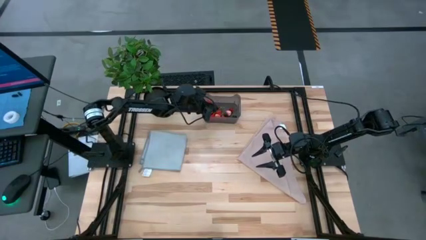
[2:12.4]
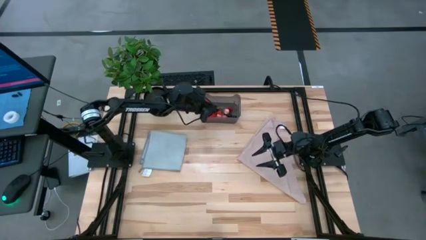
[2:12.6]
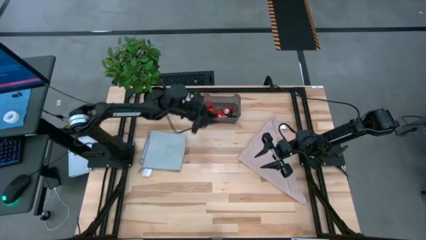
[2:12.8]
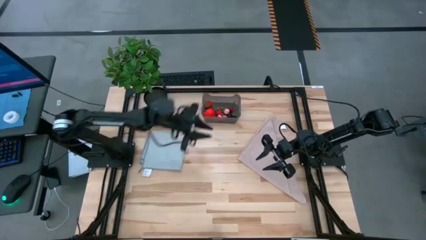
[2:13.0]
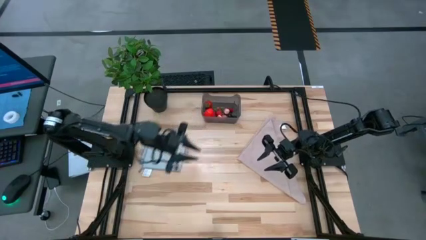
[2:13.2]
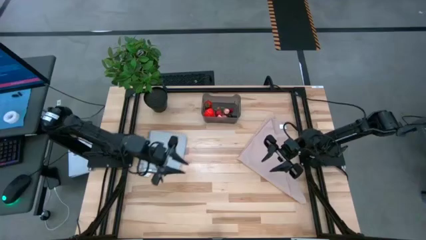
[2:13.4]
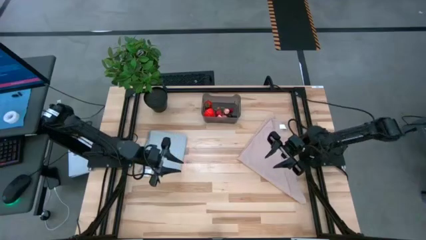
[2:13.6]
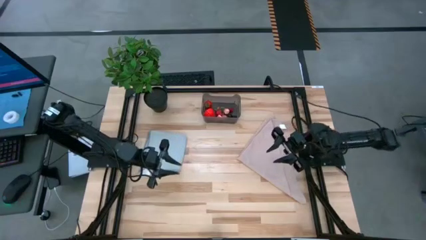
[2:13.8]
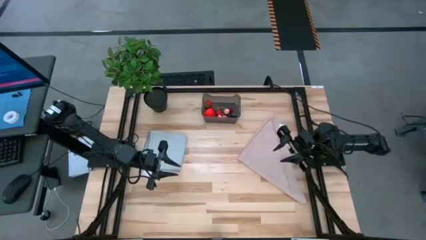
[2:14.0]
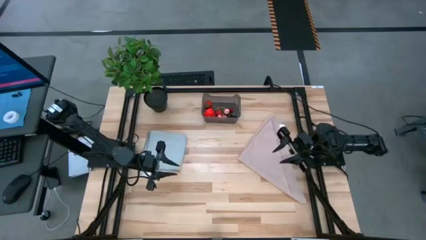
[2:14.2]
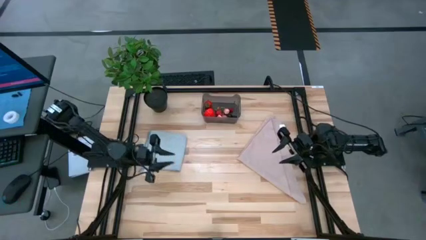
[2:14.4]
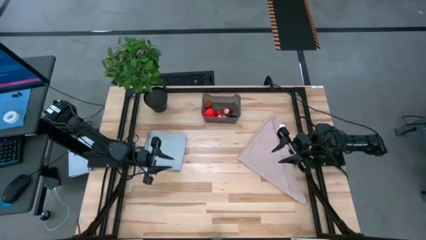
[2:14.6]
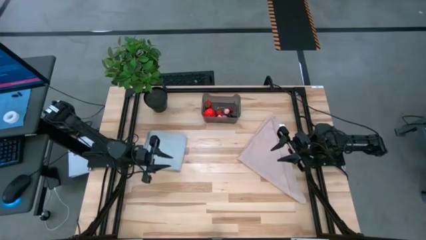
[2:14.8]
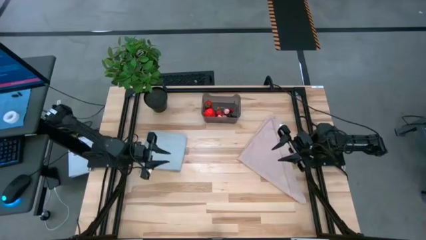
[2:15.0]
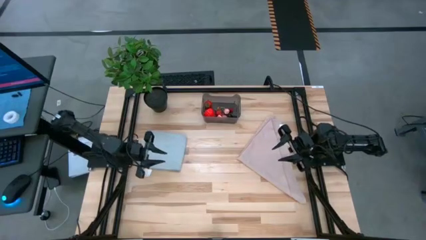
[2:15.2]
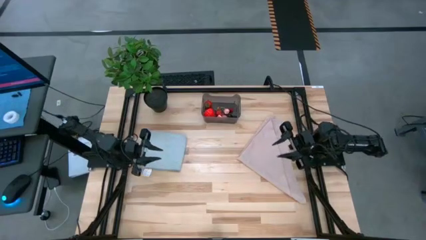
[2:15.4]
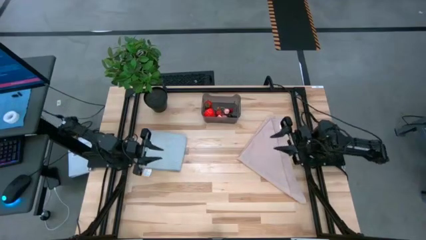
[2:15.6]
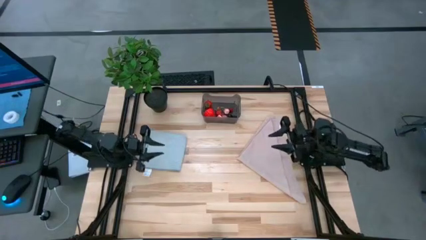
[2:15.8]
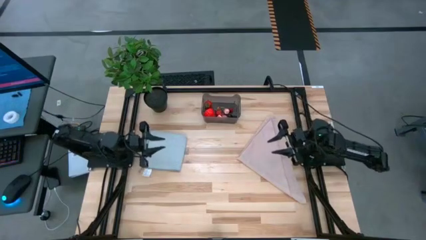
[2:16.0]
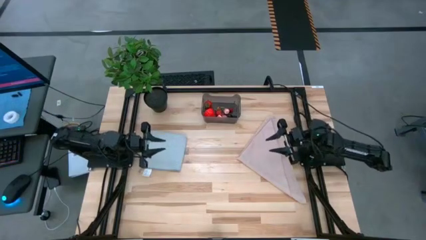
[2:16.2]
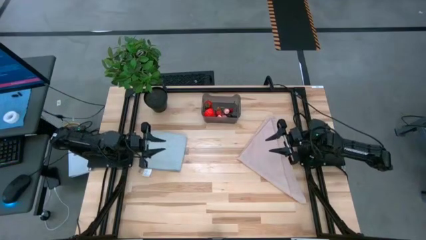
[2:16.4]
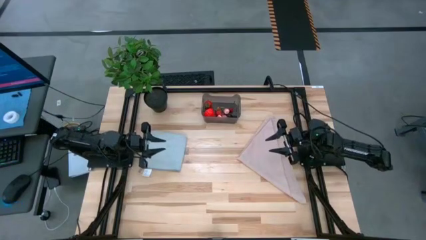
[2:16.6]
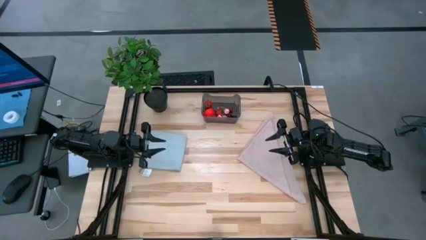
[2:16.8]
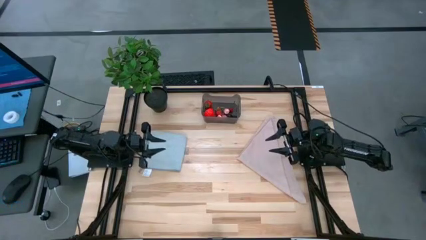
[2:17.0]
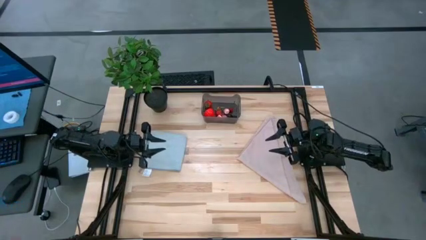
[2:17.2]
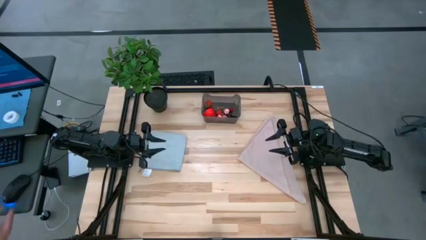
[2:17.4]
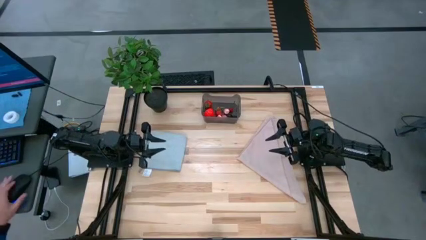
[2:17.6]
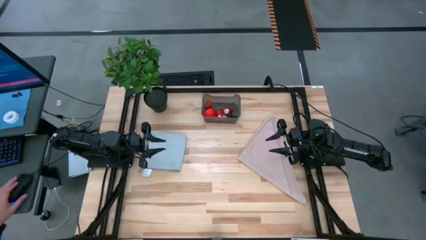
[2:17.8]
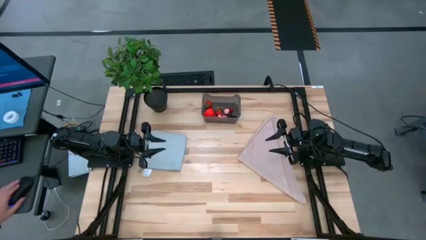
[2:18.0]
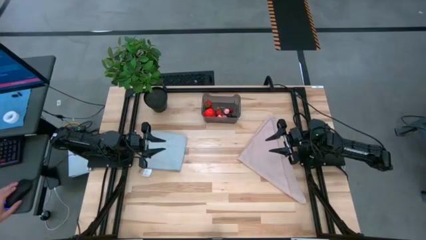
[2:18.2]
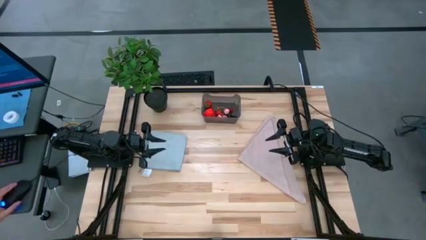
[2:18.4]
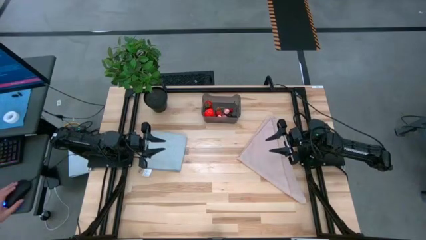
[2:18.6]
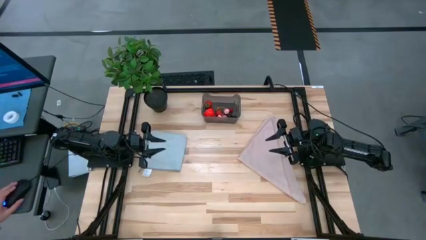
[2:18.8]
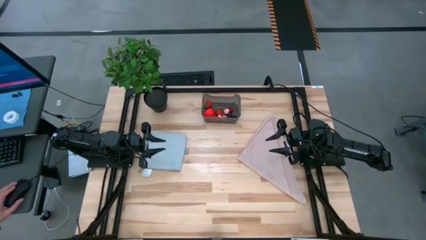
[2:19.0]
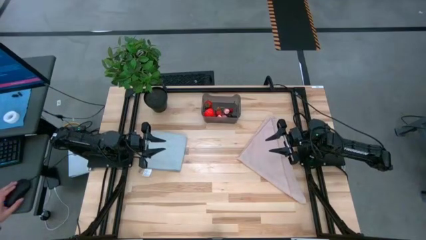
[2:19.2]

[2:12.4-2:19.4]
Task: Pick and placing Produce into tupperware
Return to Home Position

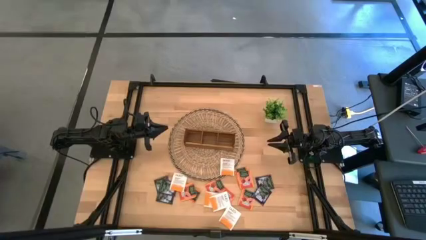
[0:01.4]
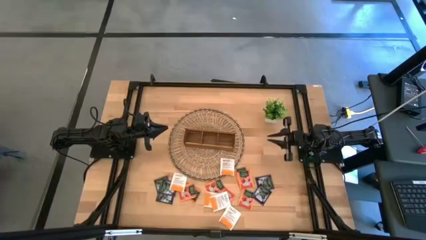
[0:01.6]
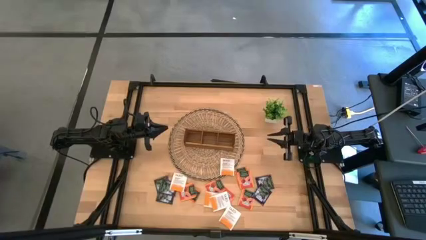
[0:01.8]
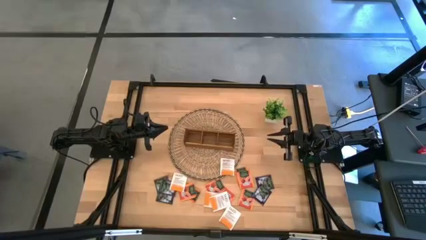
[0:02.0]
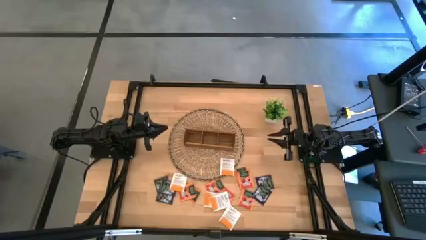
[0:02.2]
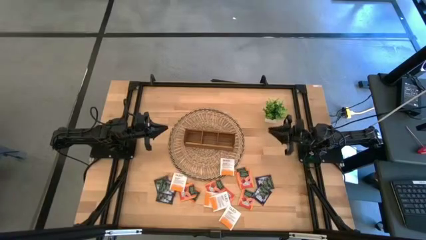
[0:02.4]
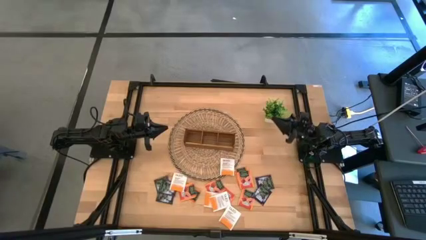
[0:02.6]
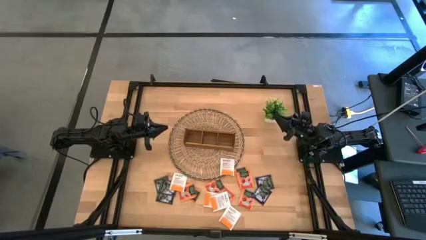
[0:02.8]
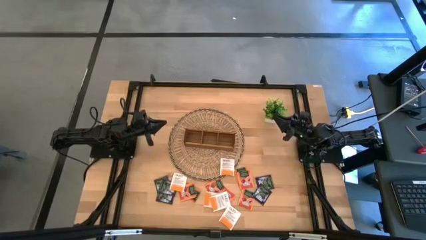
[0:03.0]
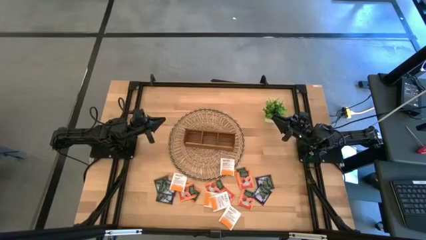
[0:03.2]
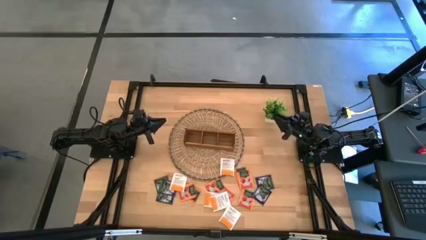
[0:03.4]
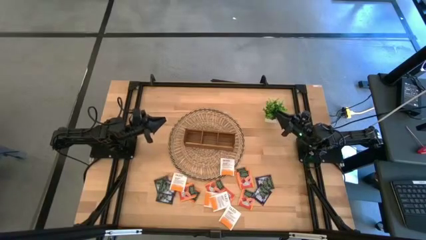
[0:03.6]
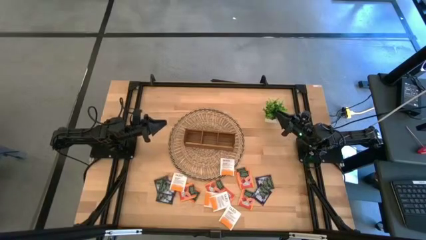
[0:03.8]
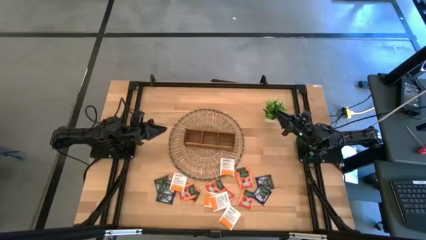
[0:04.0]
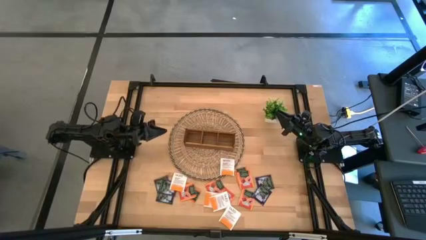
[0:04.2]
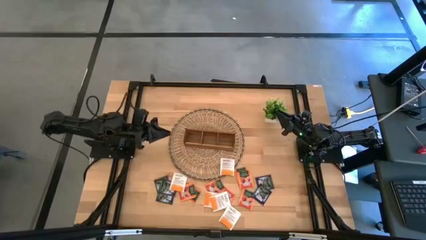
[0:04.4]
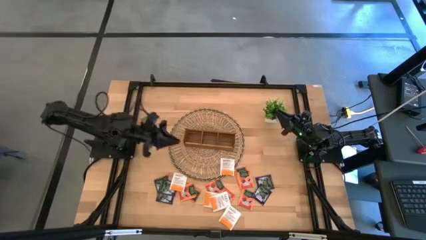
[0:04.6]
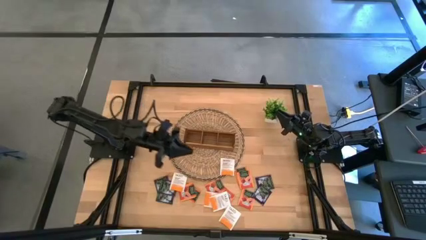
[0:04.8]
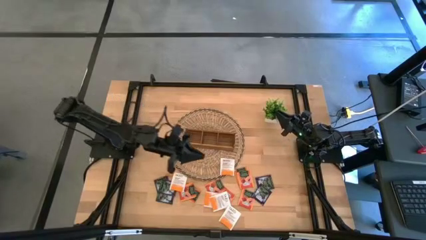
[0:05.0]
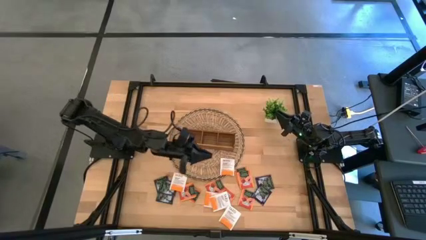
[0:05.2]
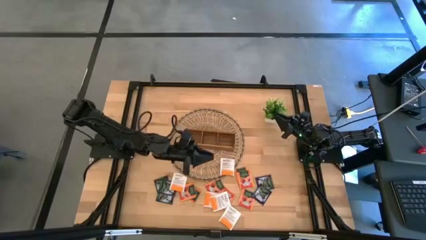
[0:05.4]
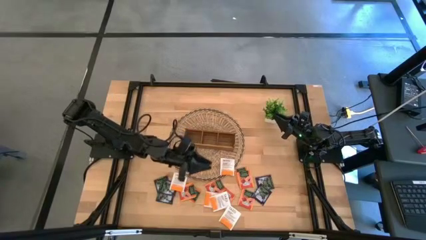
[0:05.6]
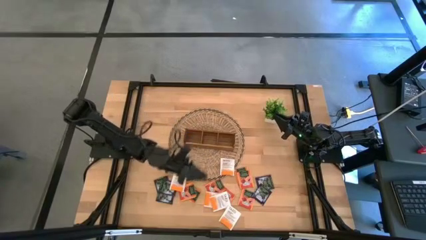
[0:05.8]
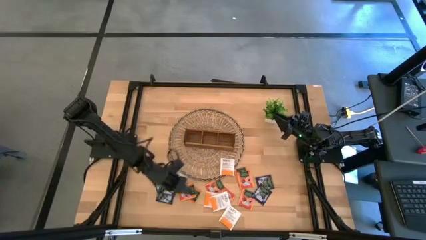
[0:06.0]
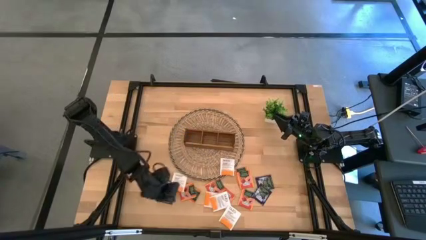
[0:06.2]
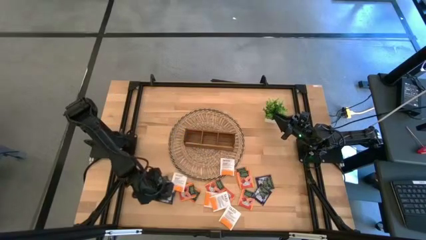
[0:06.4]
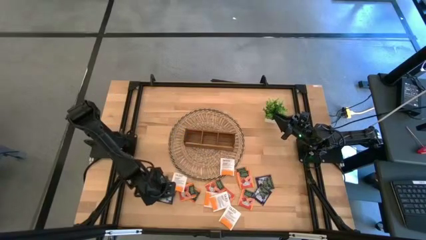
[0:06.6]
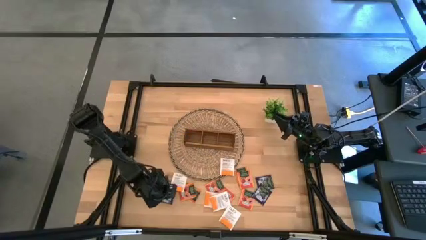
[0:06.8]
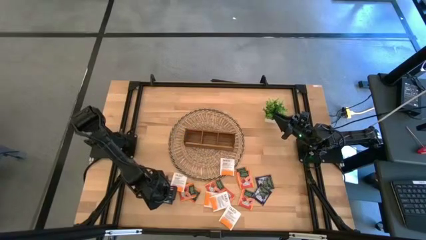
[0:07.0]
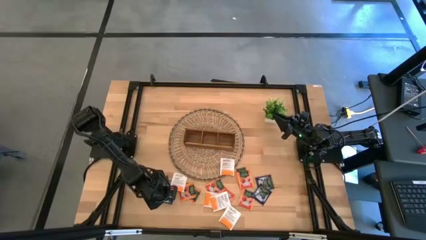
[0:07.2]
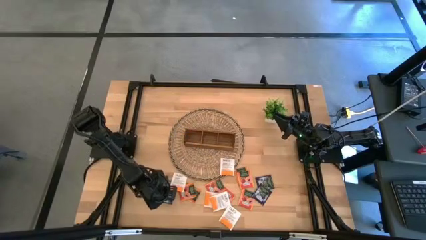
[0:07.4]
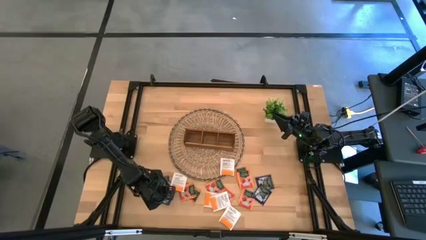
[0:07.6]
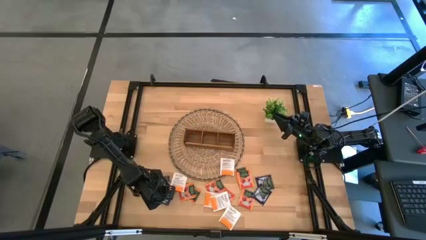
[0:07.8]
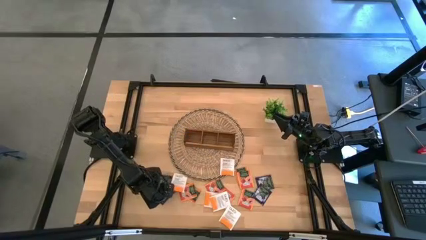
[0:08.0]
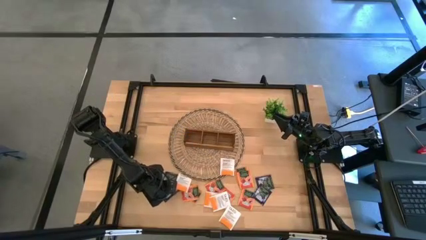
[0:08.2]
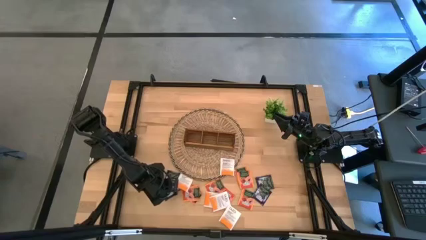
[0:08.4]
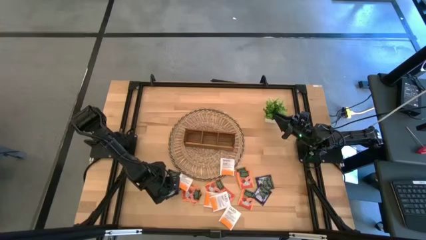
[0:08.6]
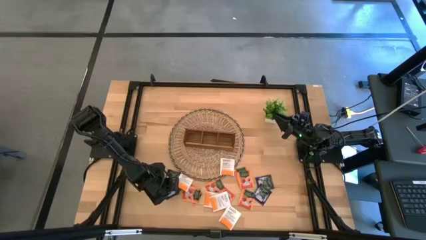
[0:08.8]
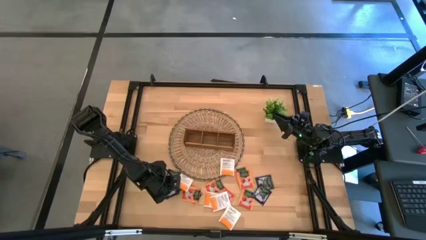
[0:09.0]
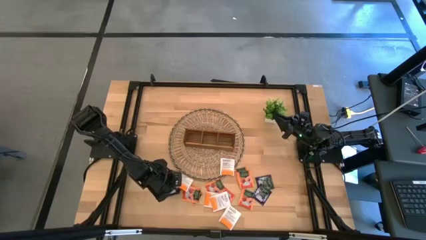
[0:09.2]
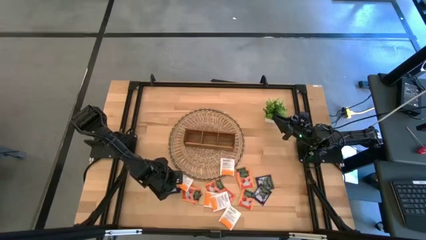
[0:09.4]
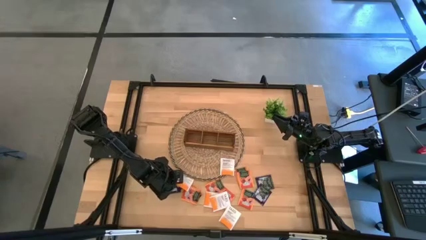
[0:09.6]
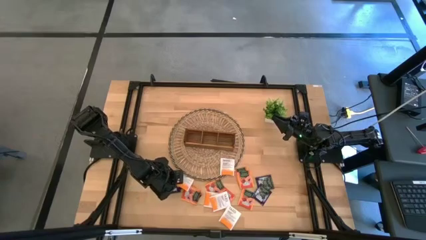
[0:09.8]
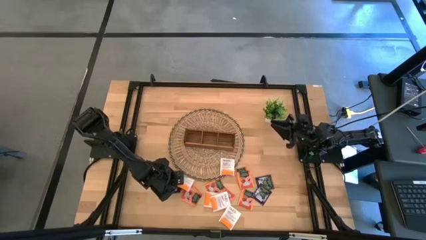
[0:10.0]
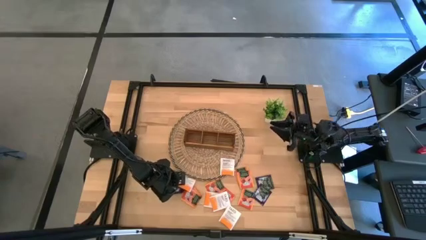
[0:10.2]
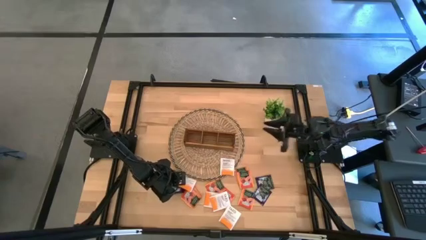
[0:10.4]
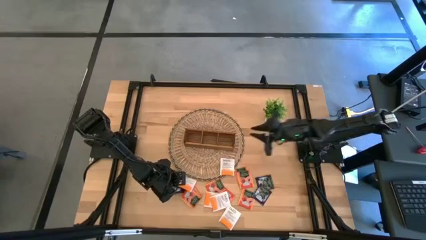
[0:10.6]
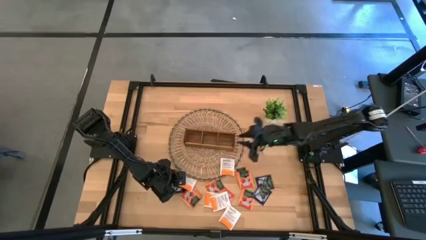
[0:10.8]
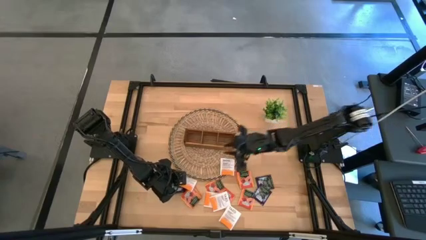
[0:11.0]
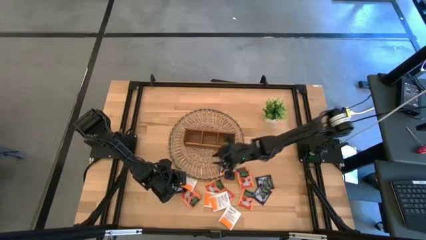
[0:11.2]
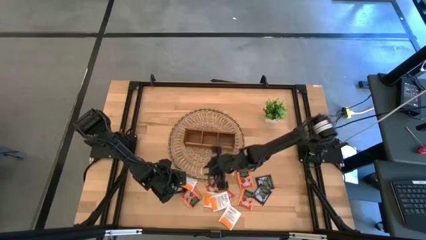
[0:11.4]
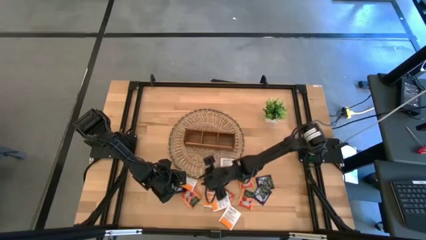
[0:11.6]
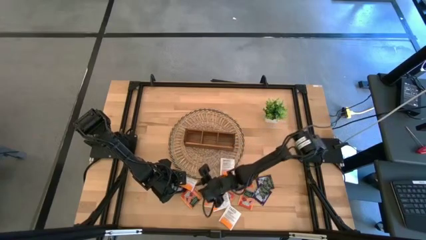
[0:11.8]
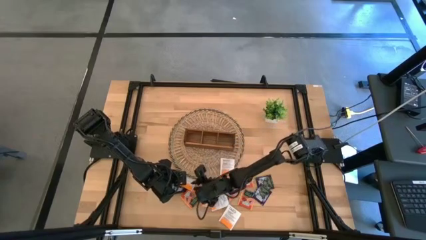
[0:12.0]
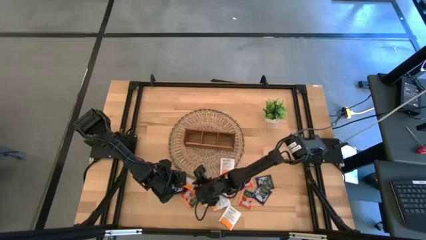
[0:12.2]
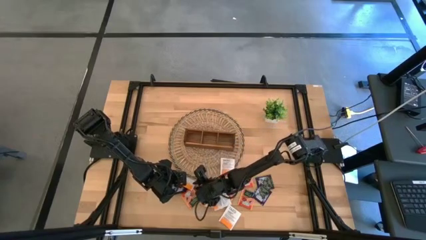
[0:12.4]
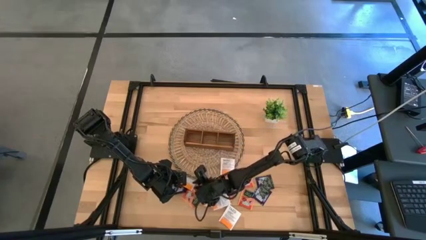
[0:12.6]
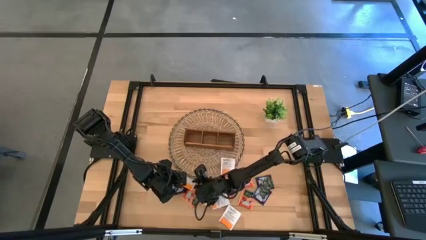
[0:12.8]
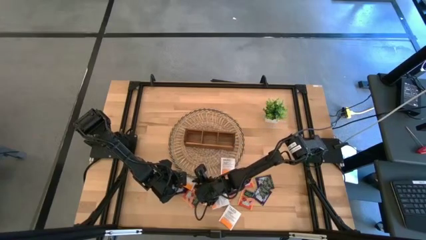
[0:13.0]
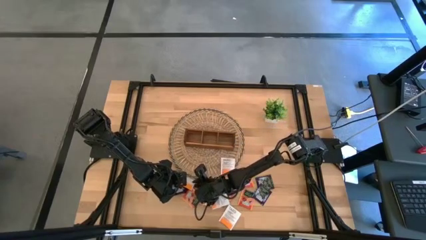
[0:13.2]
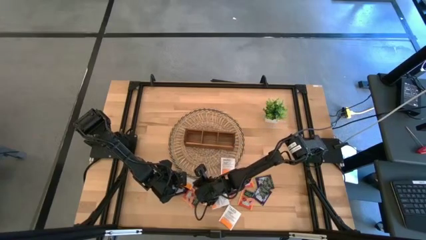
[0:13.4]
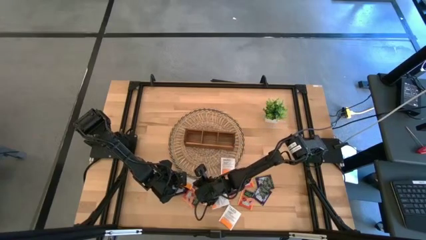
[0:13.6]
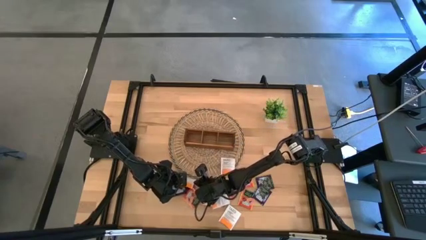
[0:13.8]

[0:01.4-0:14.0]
Task: Pick & Place Tea
Put the white tea bag into the left section of the wooden organizer
